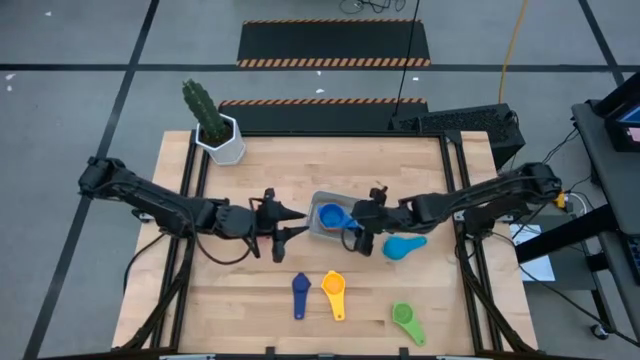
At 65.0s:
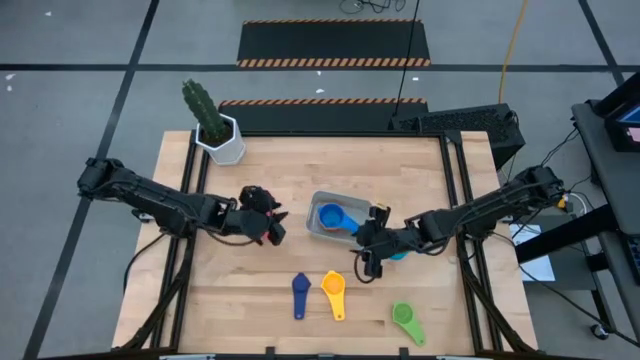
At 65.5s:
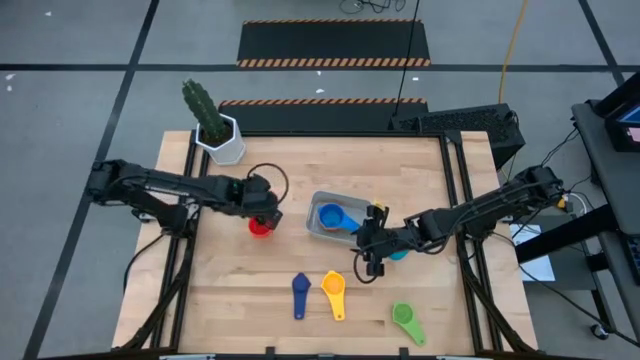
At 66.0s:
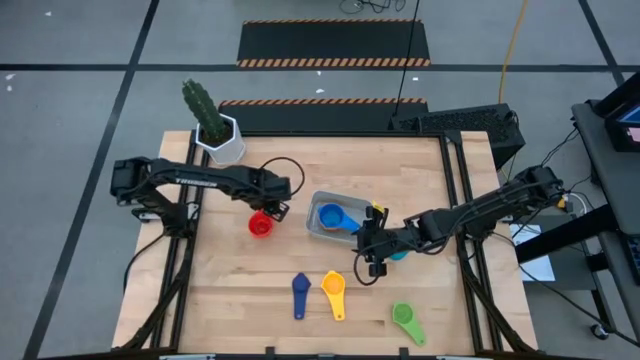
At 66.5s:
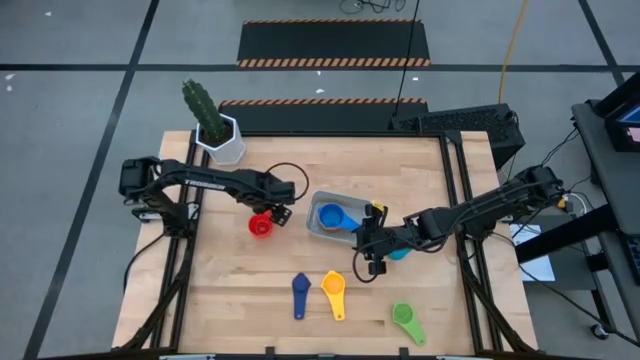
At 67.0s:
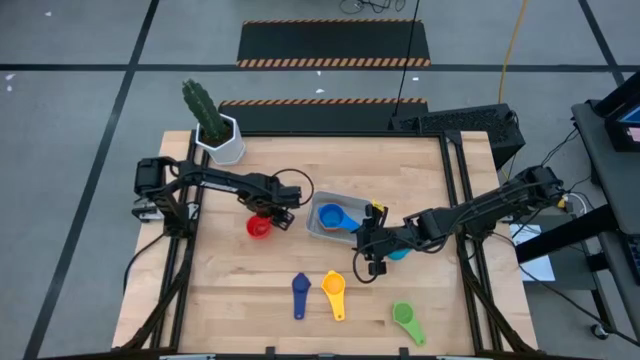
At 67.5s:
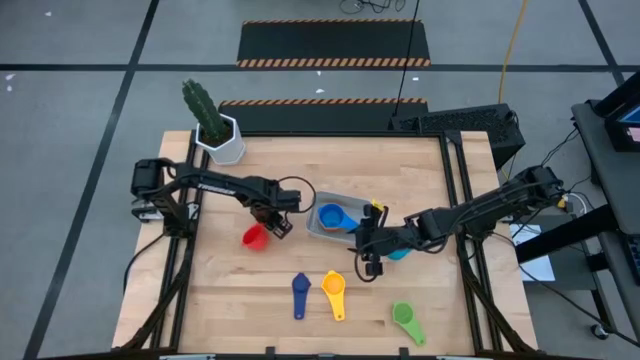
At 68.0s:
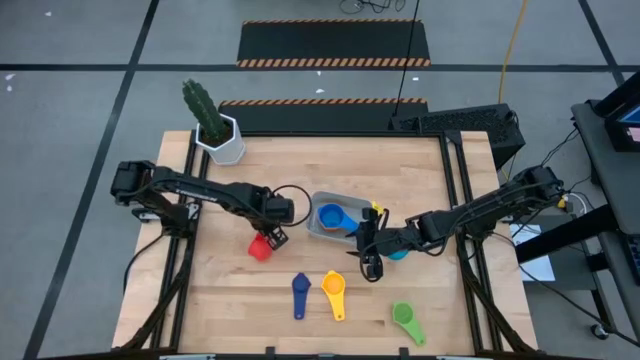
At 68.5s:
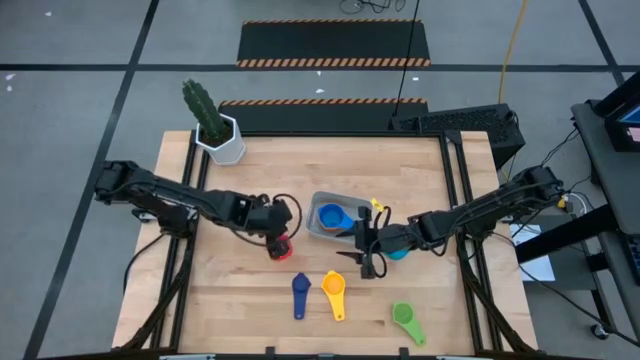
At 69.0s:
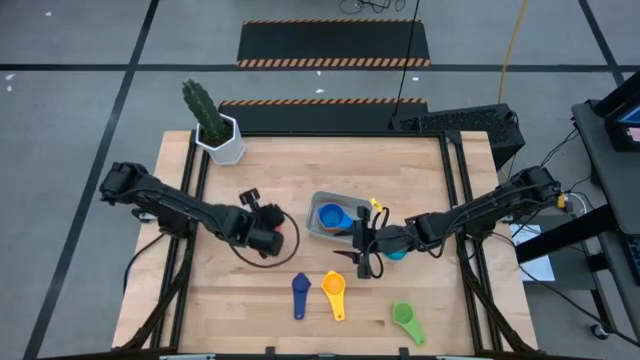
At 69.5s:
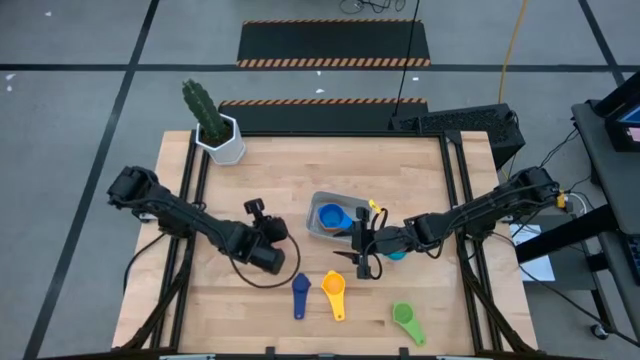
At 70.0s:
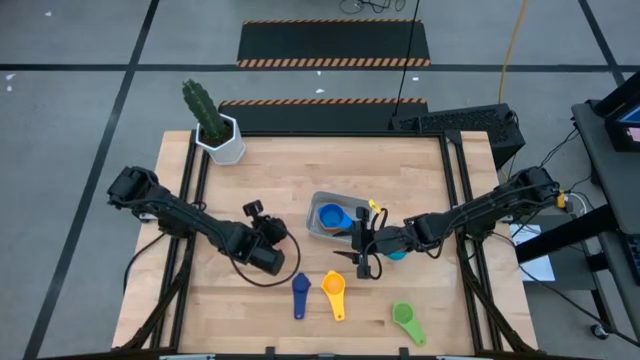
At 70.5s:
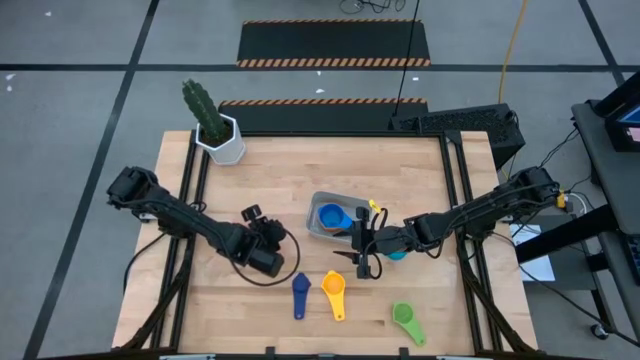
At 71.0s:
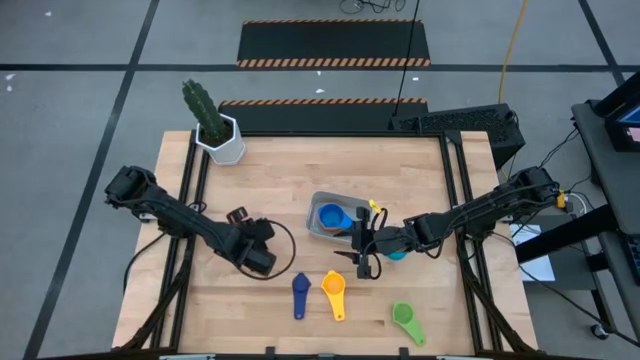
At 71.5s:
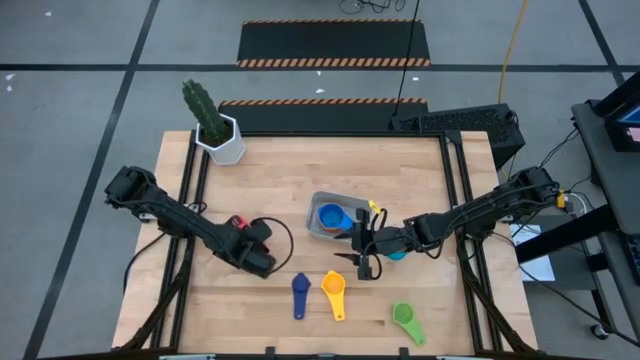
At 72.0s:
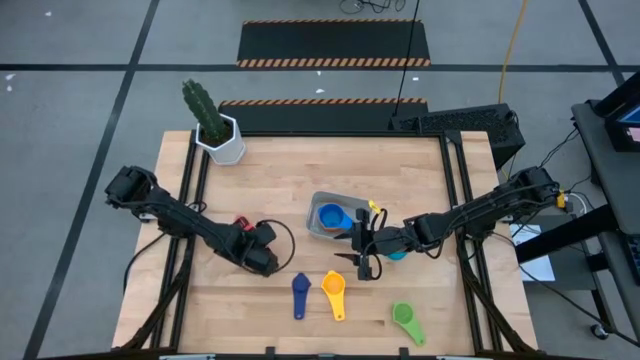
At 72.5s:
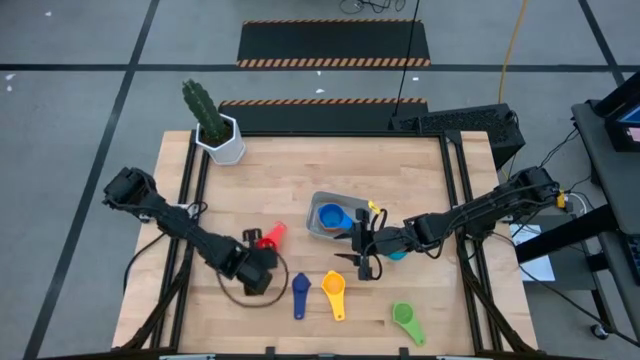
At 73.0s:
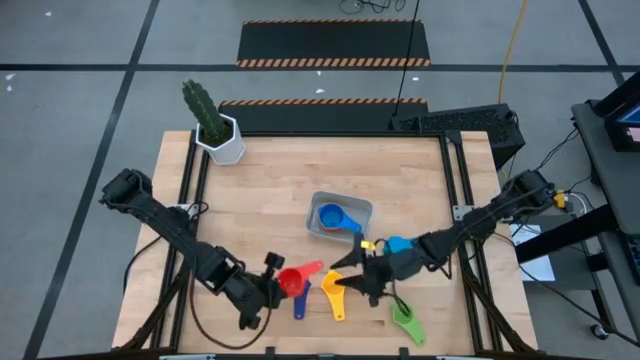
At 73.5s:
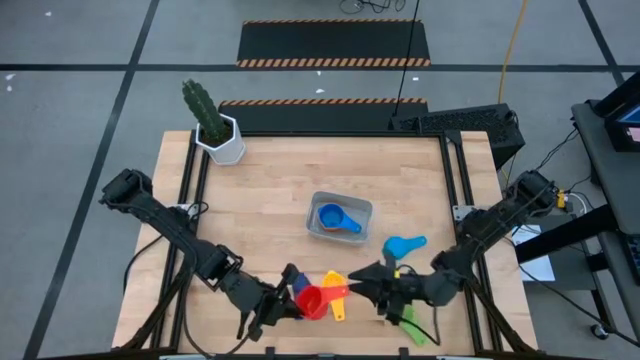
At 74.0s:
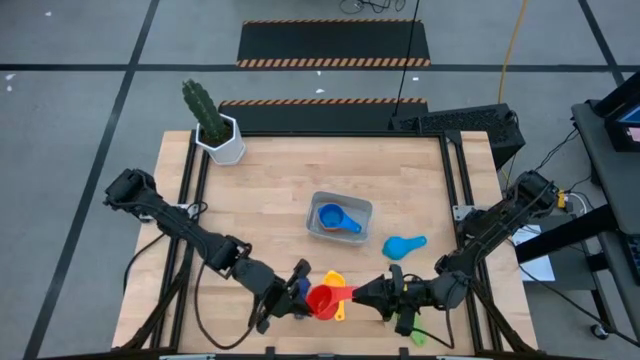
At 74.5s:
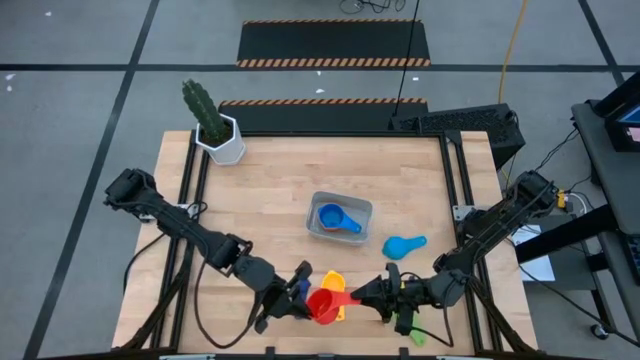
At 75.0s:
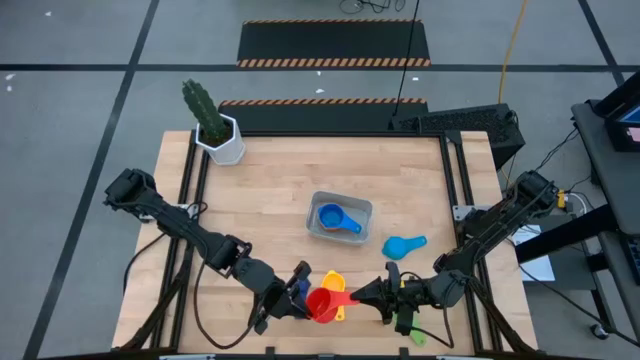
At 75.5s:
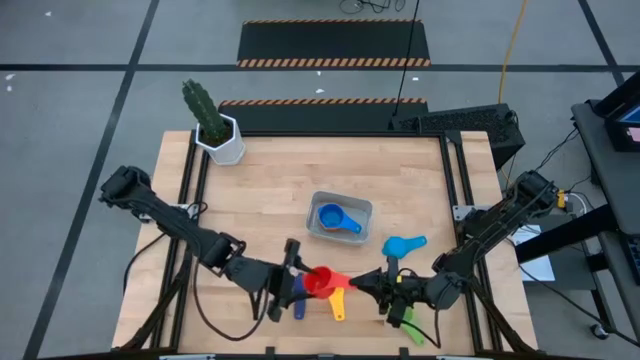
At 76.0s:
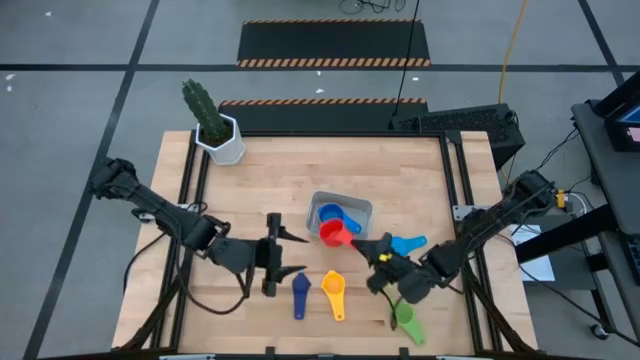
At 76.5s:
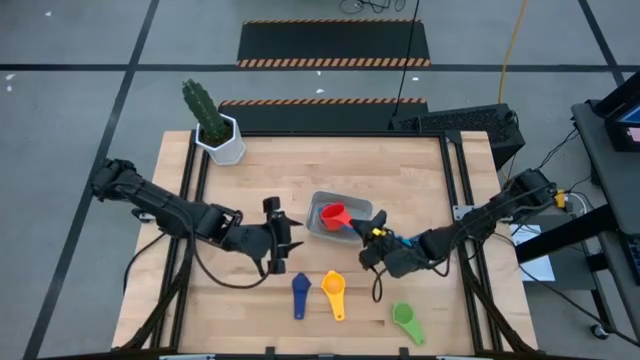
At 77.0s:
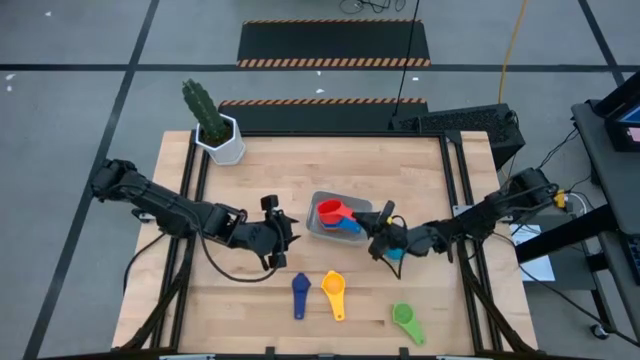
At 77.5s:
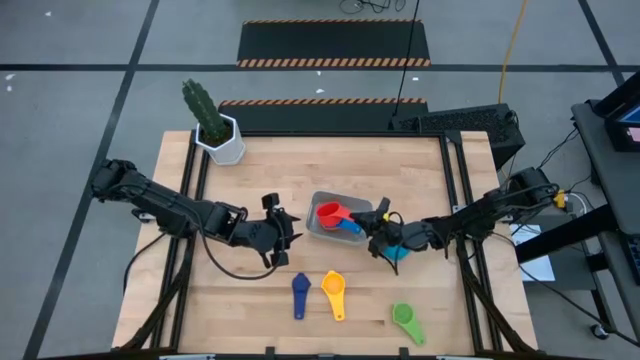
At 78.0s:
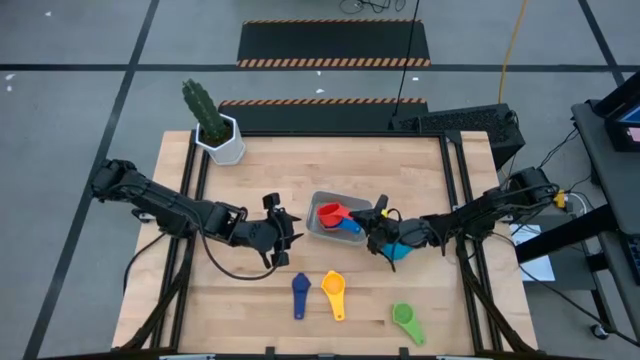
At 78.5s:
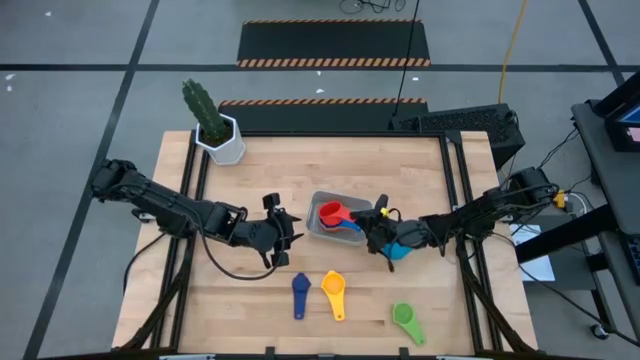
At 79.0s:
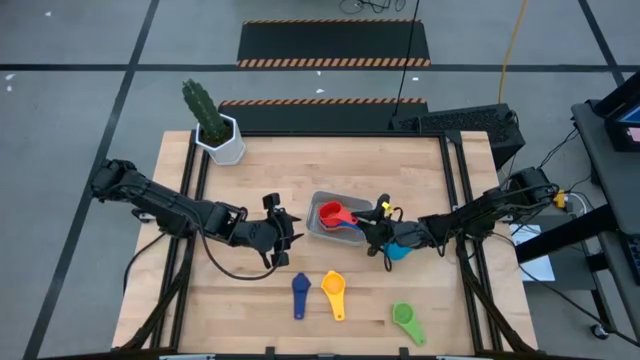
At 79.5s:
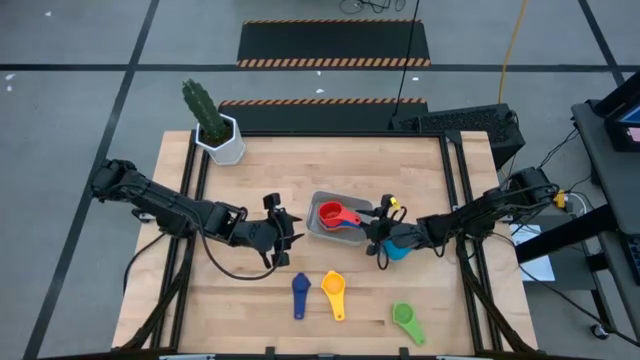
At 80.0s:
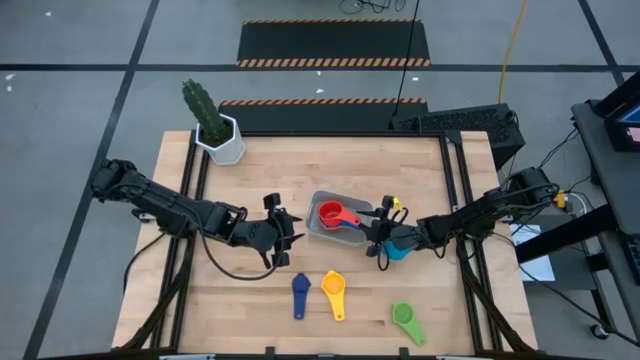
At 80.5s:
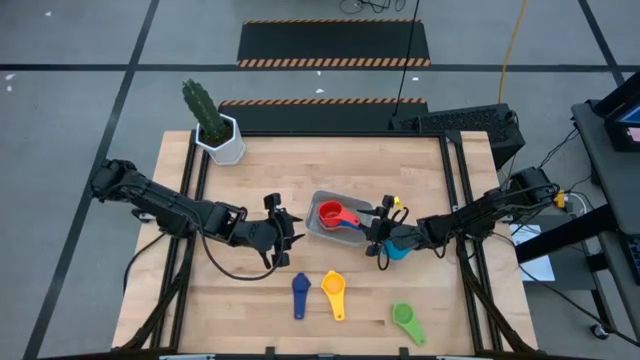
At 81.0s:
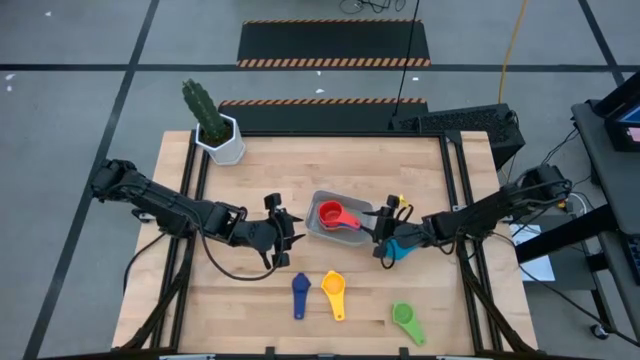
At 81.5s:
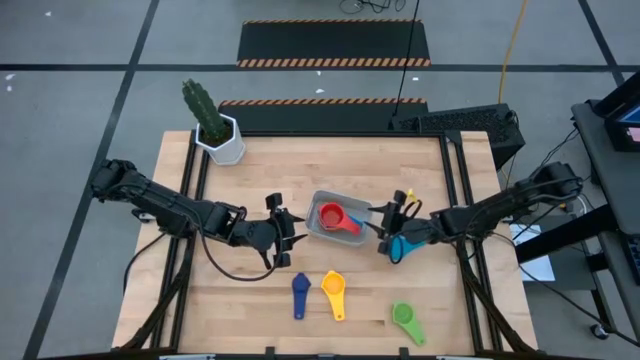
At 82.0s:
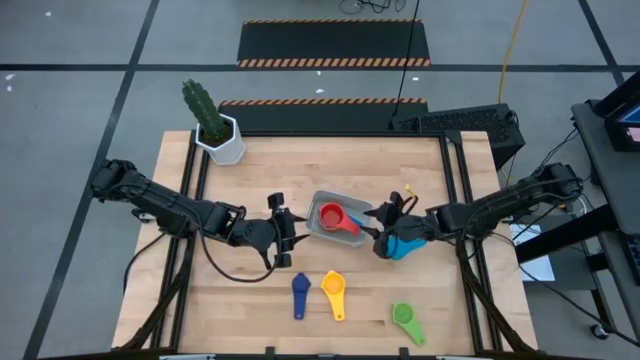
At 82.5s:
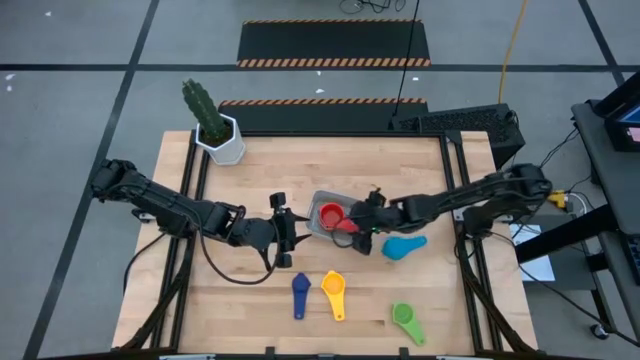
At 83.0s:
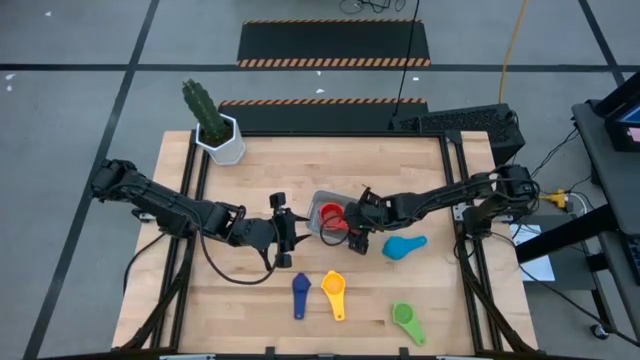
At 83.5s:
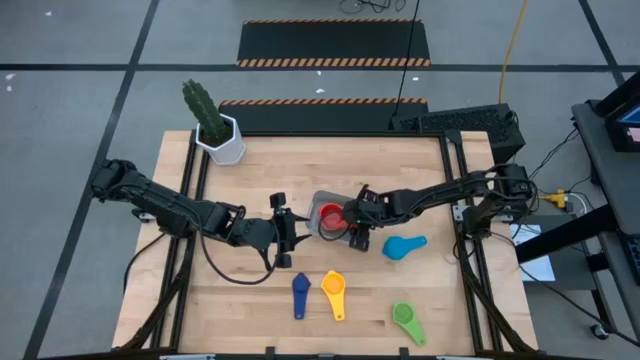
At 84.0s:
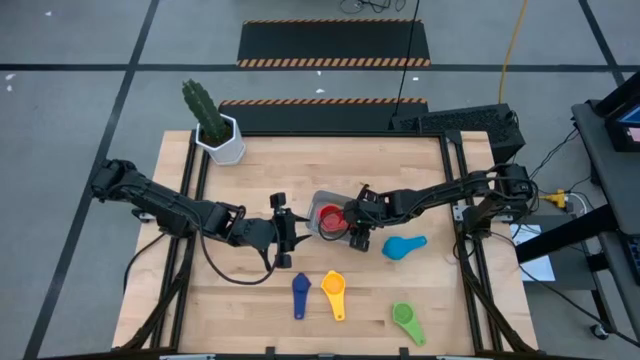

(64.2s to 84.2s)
Task: Nest measuring cups in basket
Stack the red measuring cup into the blue measuring cup

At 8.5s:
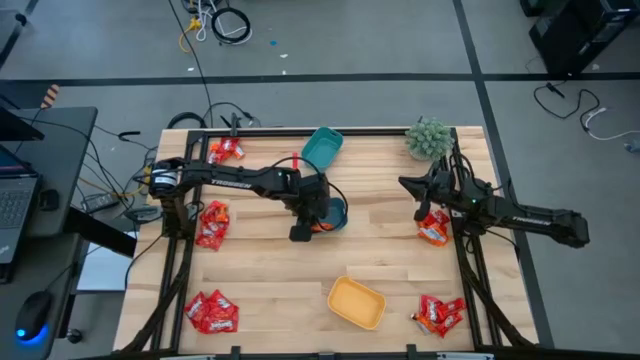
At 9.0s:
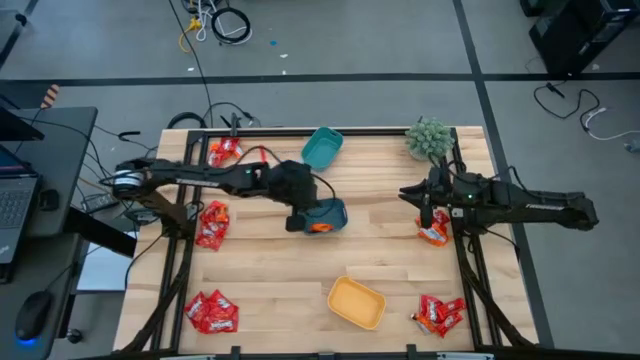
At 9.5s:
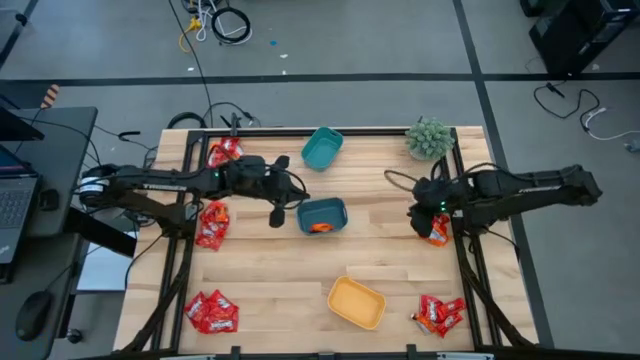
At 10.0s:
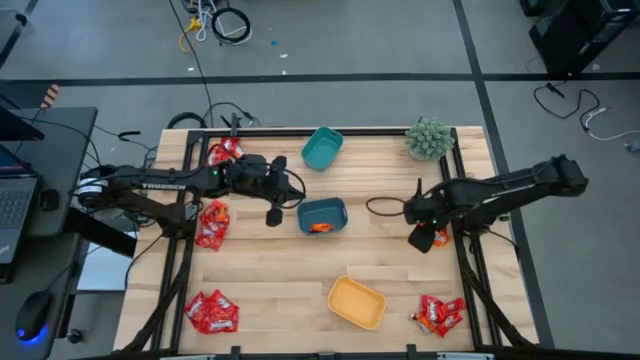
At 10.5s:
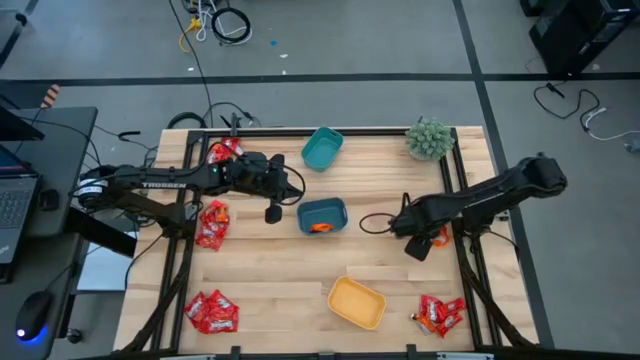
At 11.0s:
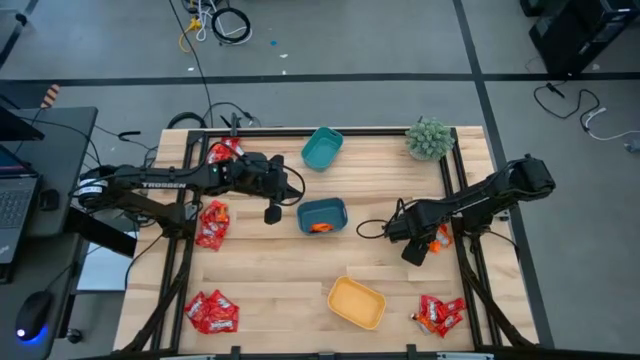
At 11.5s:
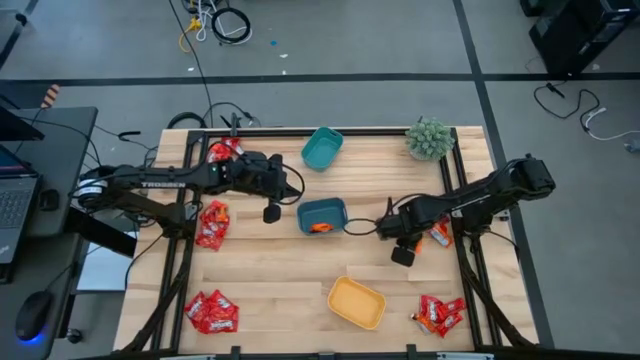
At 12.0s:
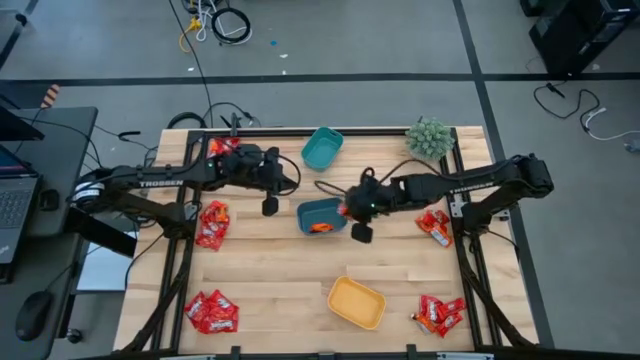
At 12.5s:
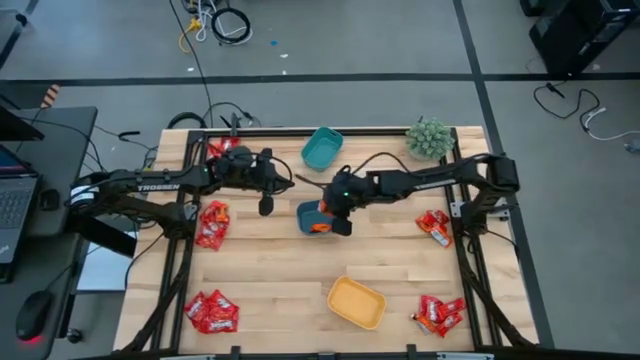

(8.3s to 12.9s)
Task: Sort candy
Put the orange chocolate into the blue bin
